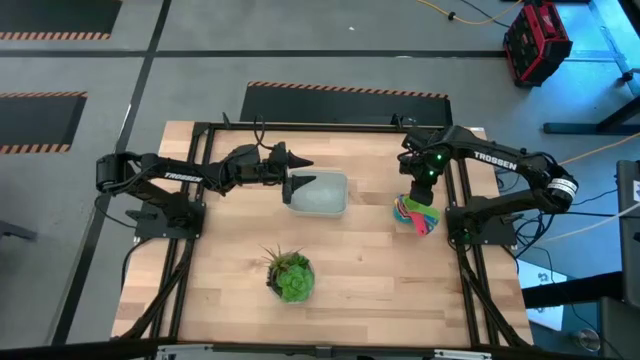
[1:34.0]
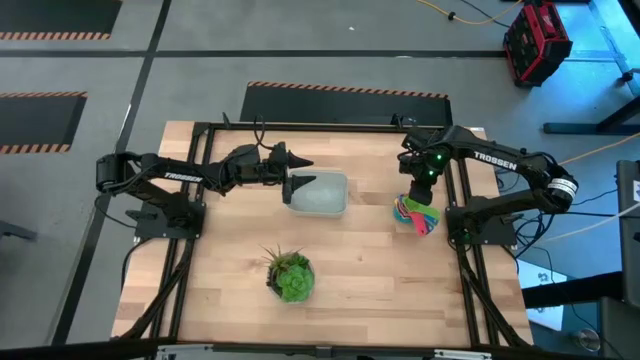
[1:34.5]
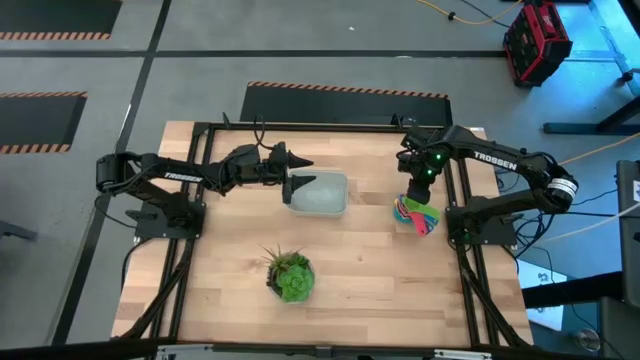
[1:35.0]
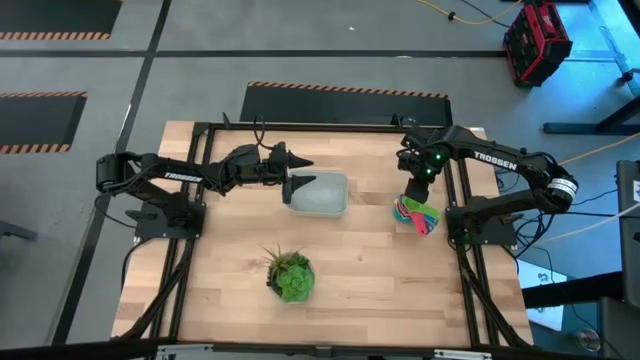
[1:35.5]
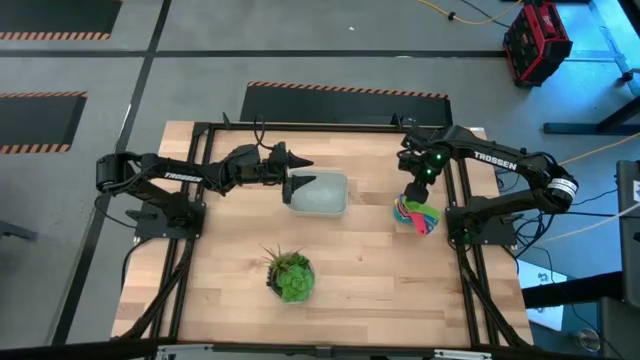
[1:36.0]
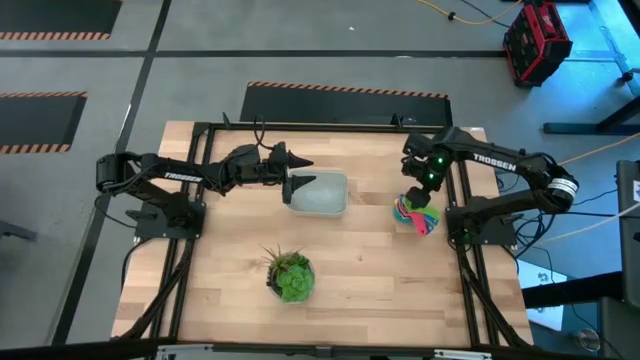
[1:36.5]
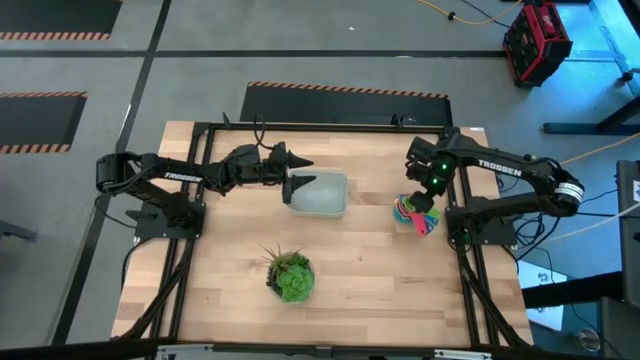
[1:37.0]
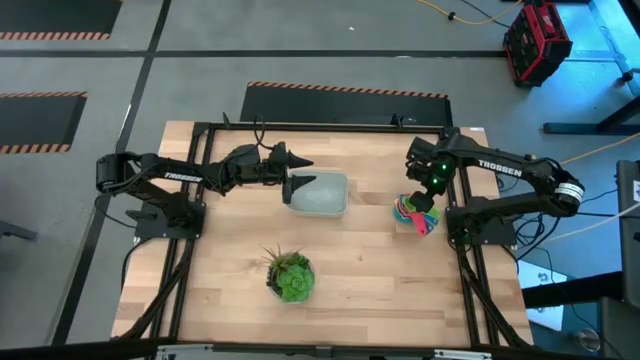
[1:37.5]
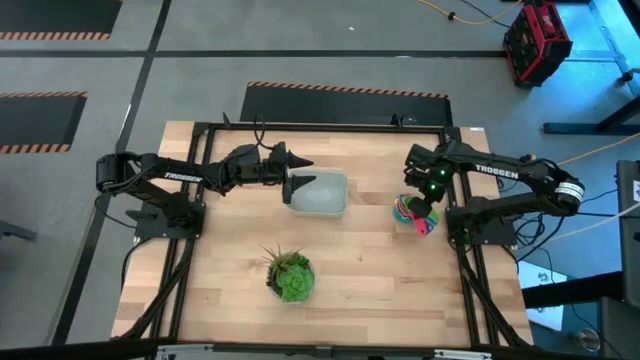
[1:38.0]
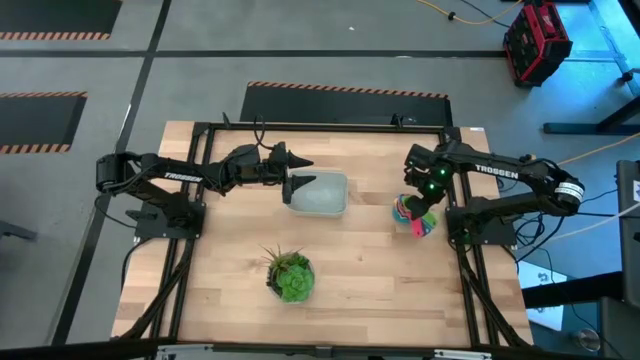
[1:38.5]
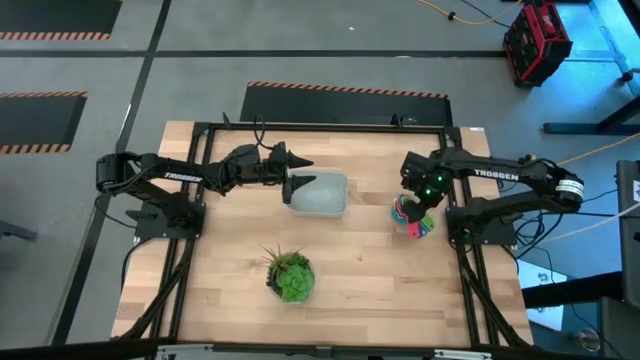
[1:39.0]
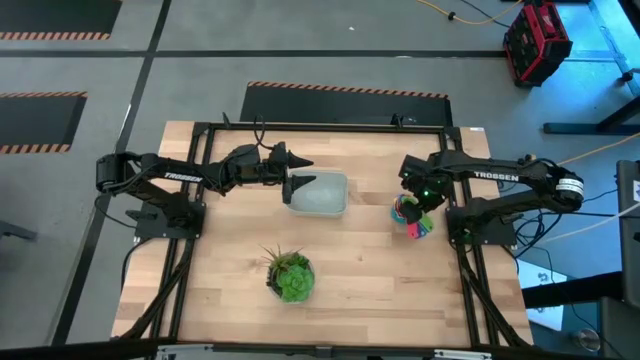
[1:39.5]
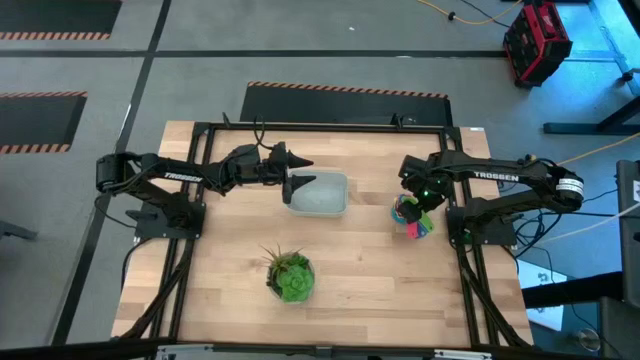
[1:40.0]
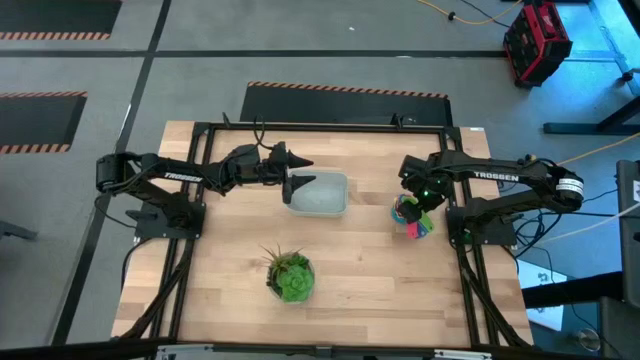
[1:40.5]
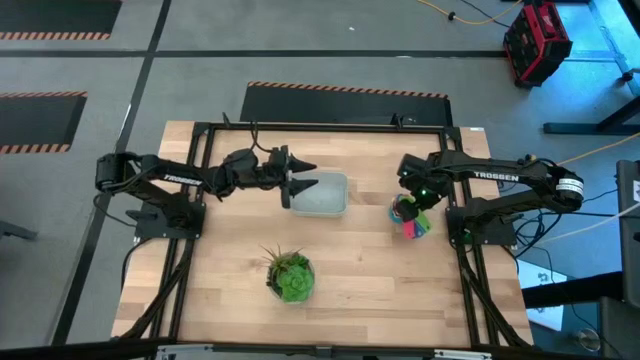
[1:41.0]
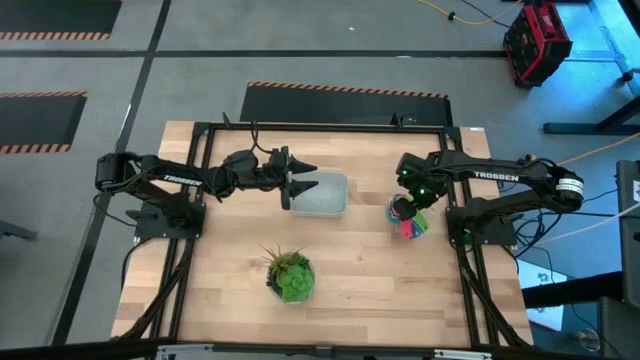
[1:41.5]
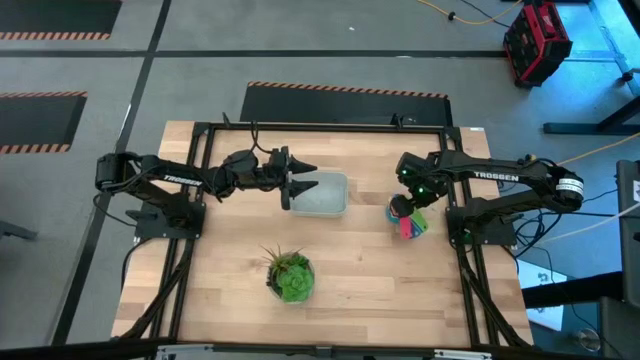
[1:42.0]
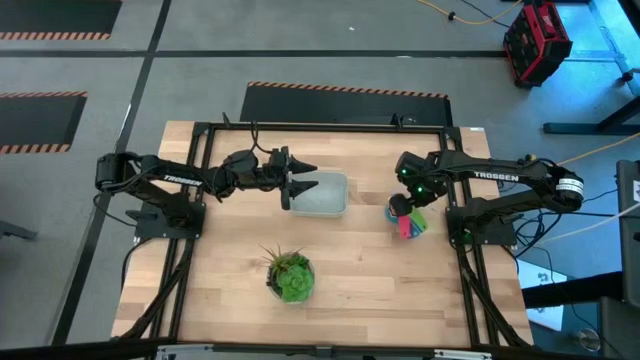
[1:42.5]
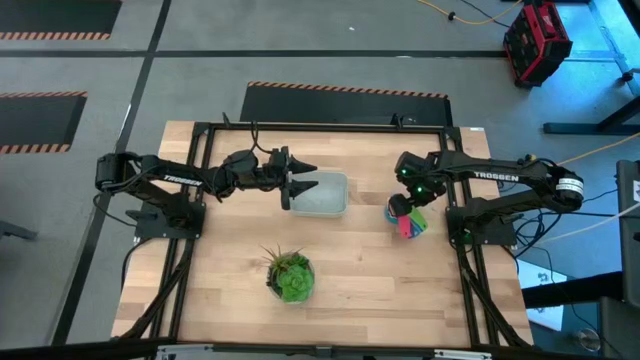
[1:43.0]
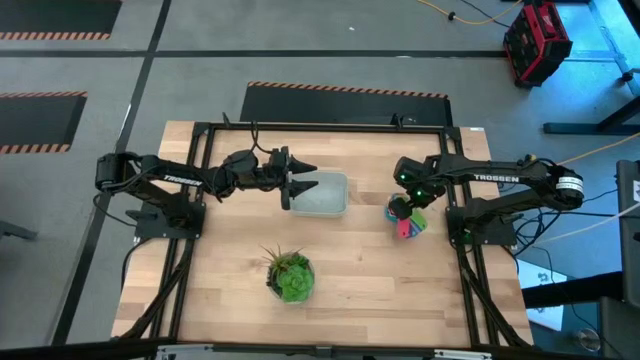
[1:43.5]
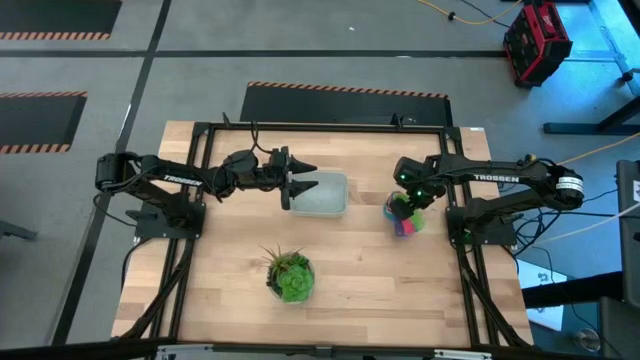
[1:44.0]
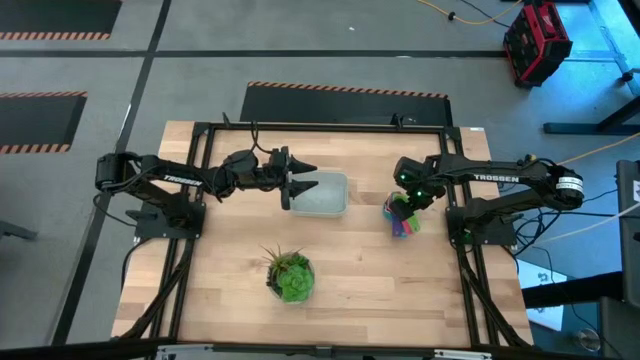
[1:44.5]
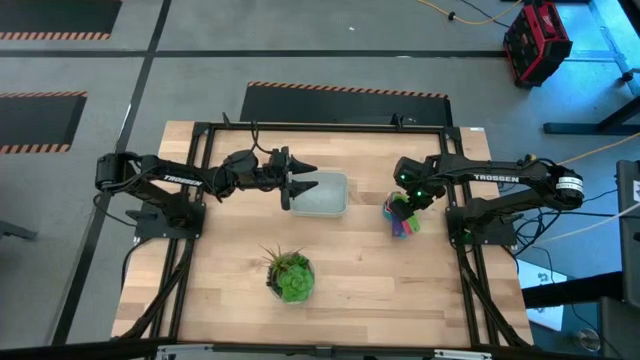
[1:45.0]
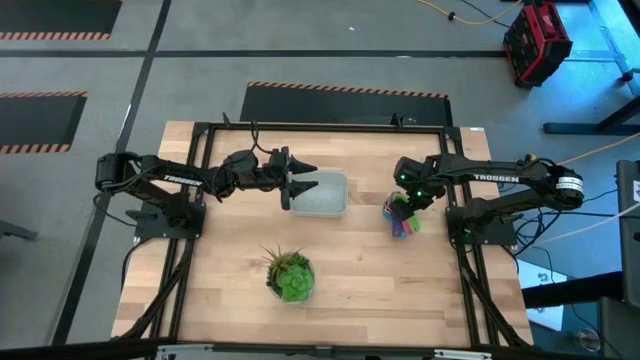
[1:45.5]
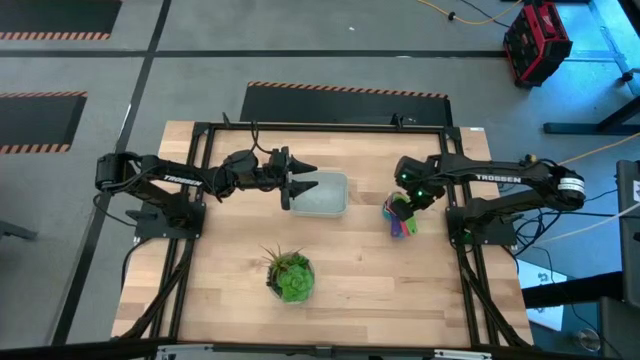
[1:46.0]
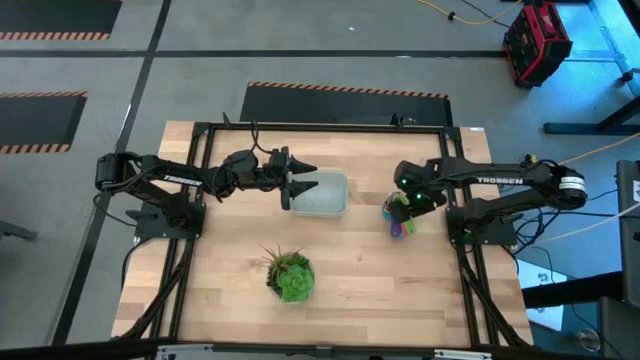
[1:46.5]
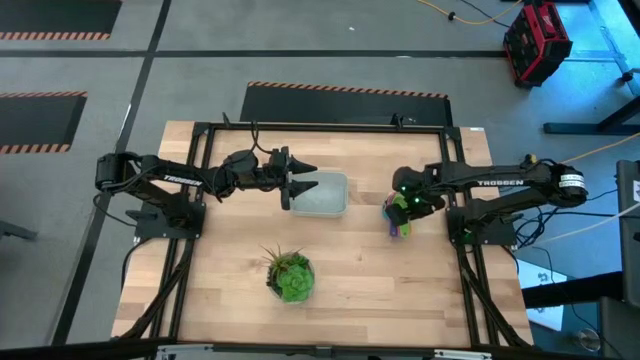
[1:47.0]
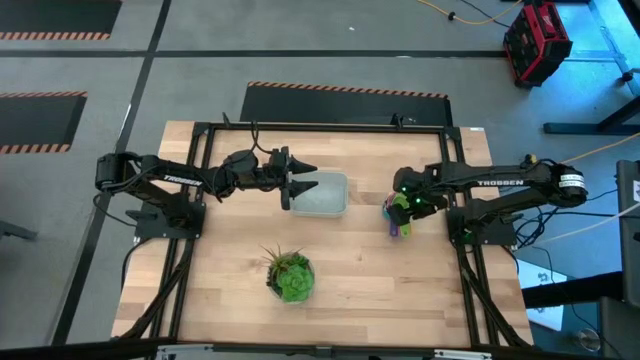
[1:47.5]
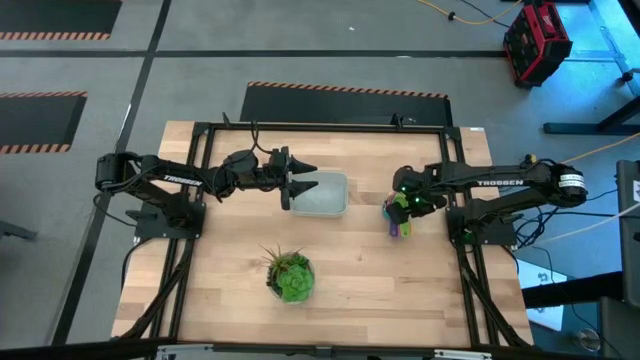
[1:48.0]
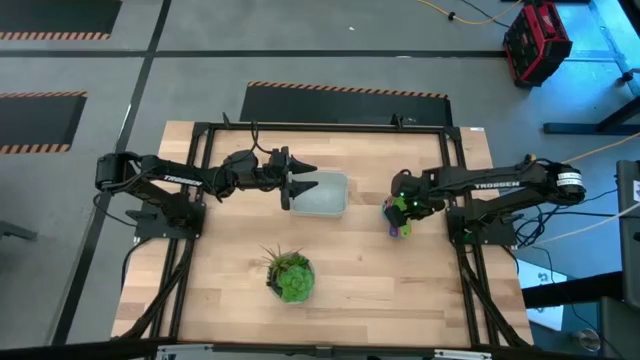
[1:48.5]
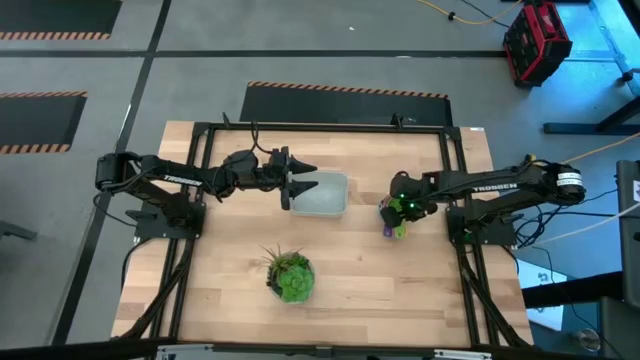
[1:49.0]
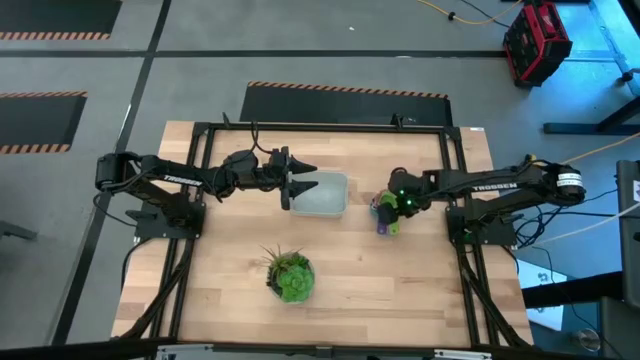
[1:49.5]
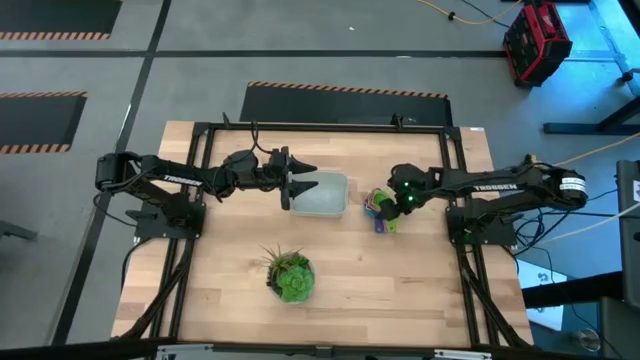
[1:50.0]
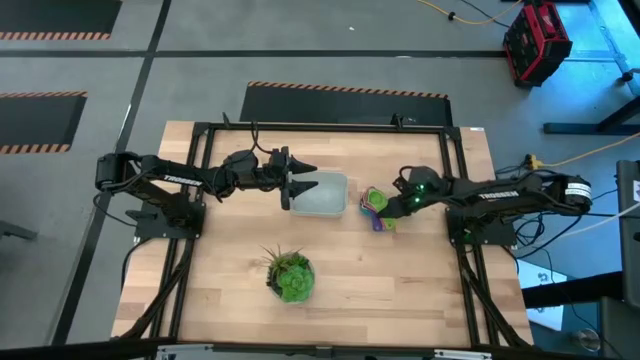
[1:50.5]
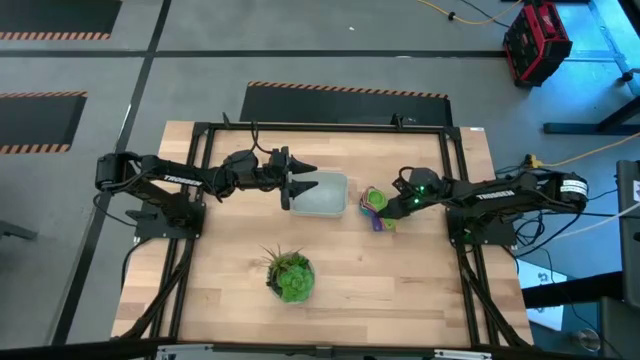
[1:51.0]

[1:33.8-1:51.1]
Task: Nest measuring cups in basket
Put the stacked measuring cups into the gray bin

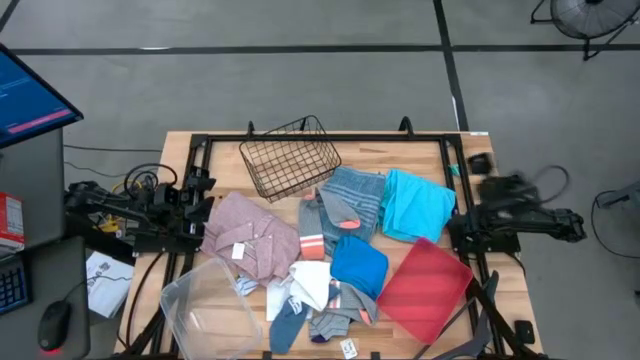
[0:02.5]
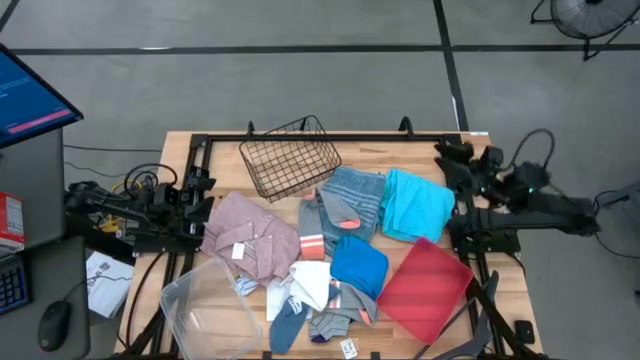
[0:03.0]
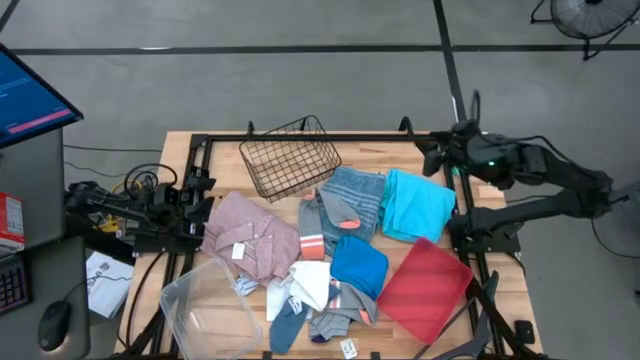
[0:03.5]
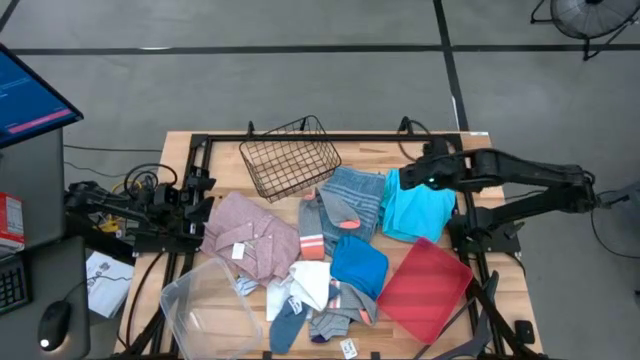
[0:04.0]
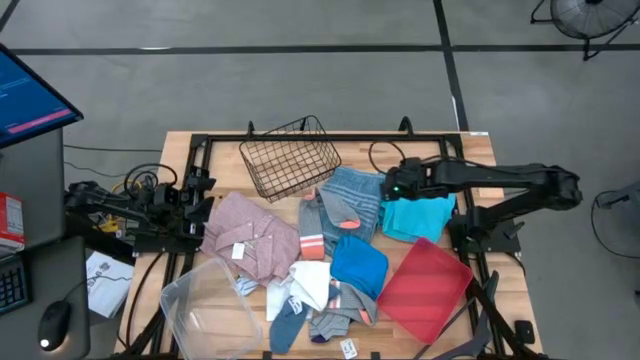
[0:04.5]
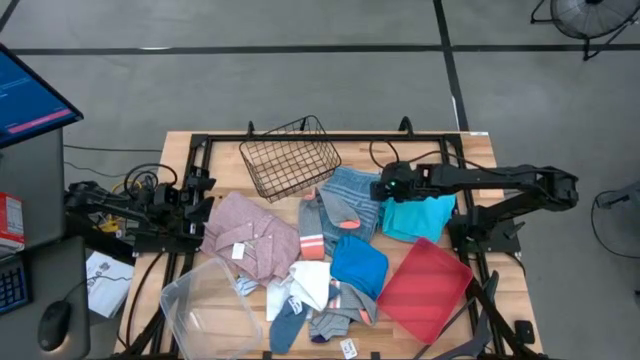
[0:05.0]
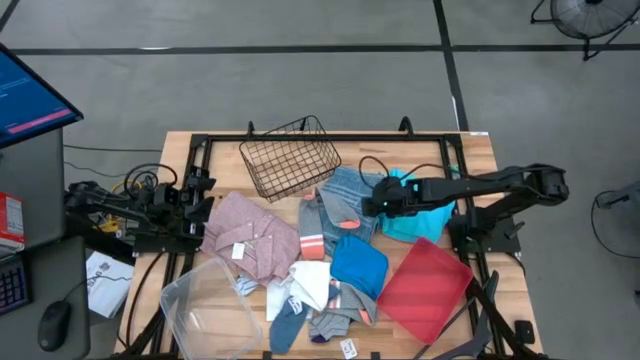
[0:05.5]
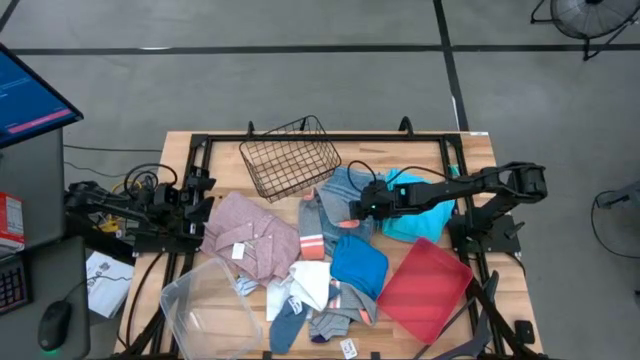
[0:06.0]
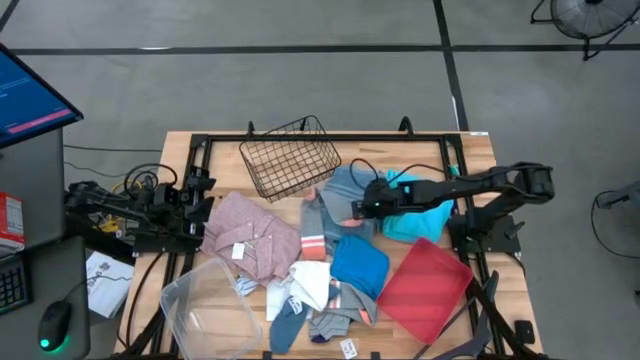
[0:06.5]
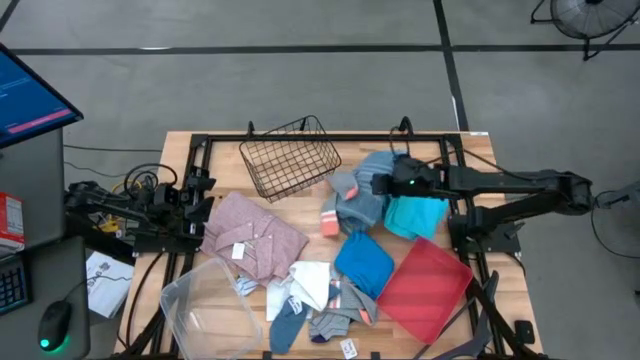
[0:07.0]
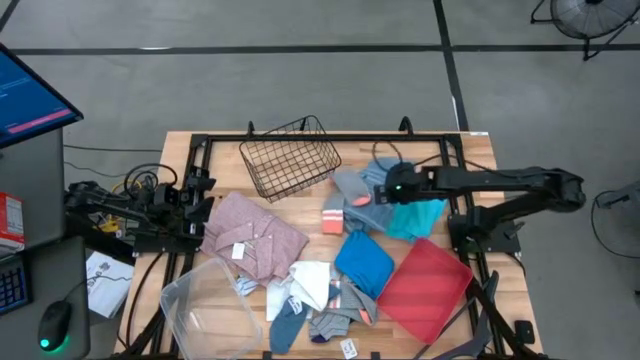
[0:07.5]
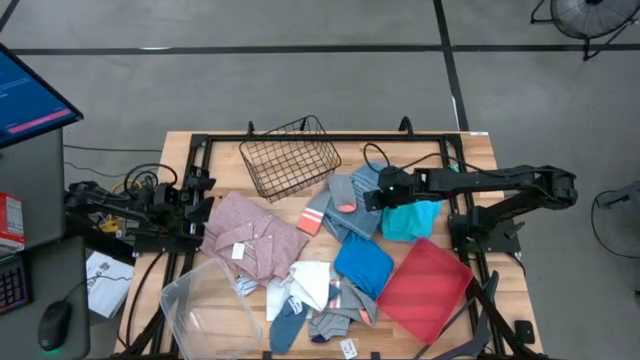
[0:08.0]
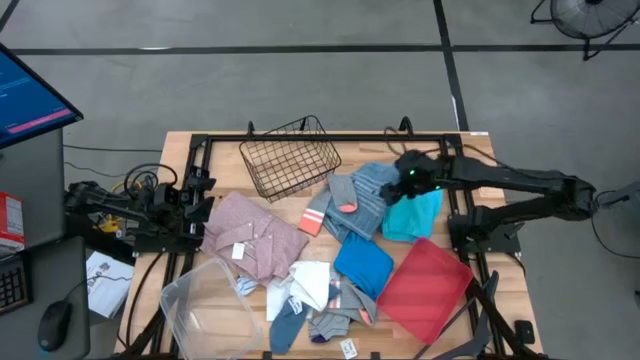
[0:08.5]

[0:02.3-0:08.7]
Task: Pick & Place Cloths
Put the blue polo shirt into the black mesh basket
